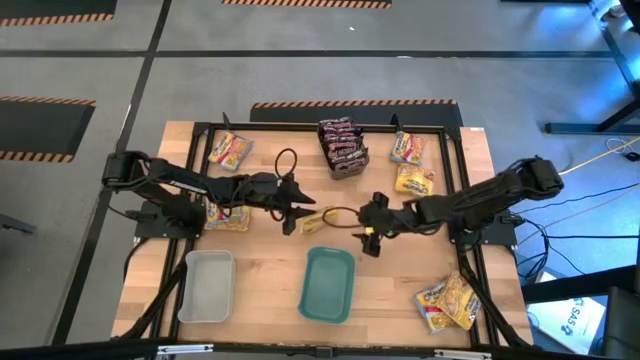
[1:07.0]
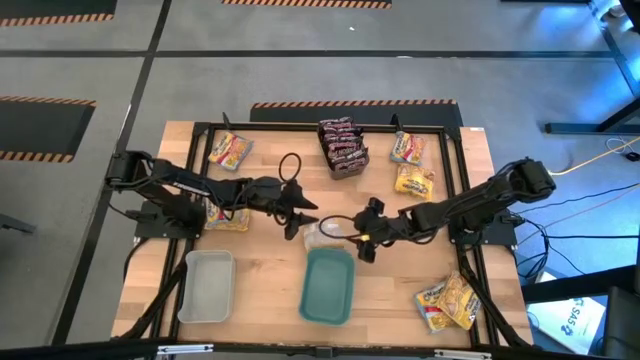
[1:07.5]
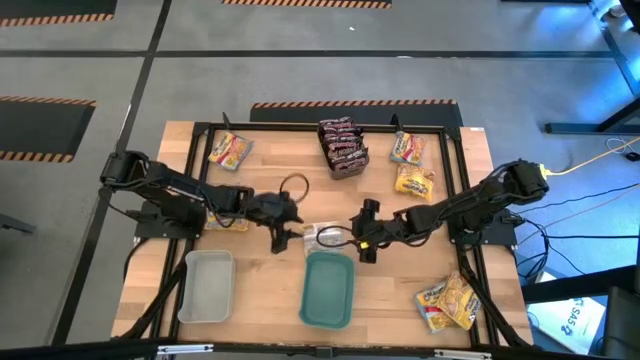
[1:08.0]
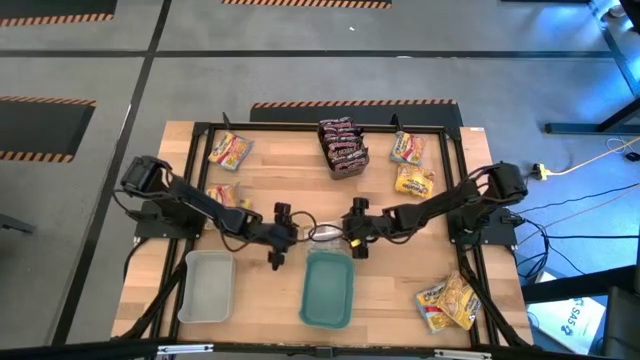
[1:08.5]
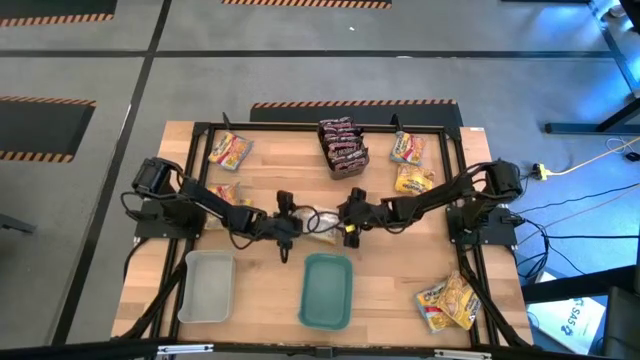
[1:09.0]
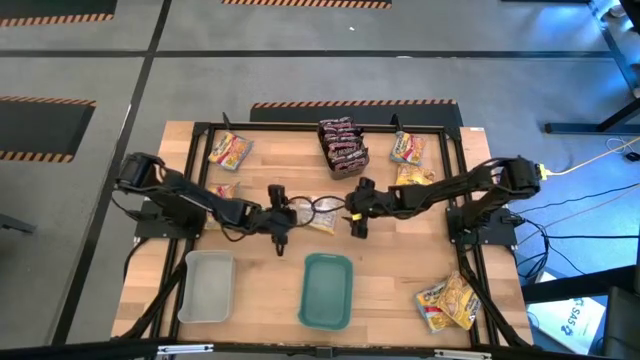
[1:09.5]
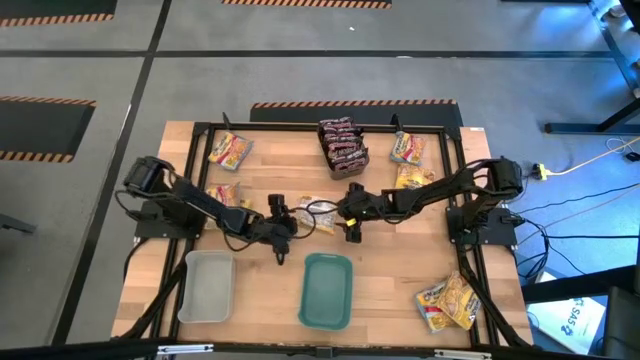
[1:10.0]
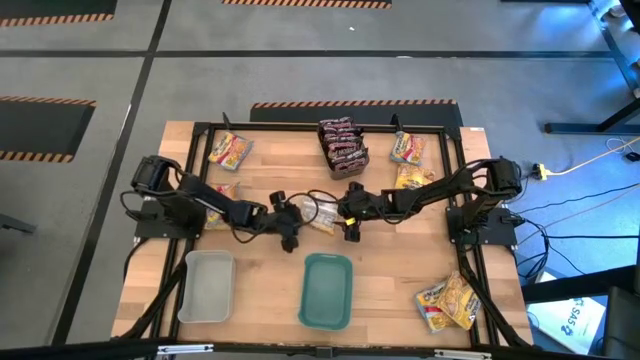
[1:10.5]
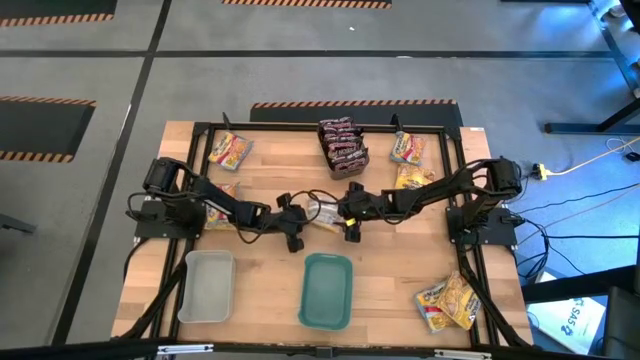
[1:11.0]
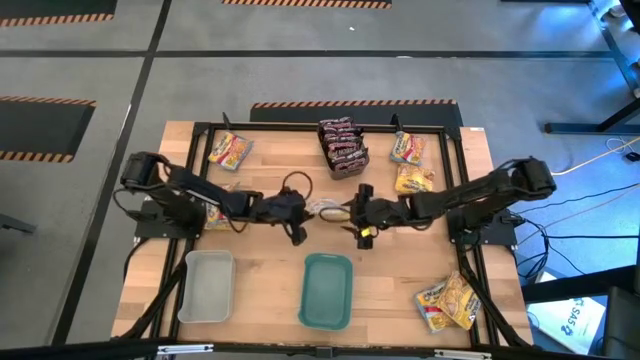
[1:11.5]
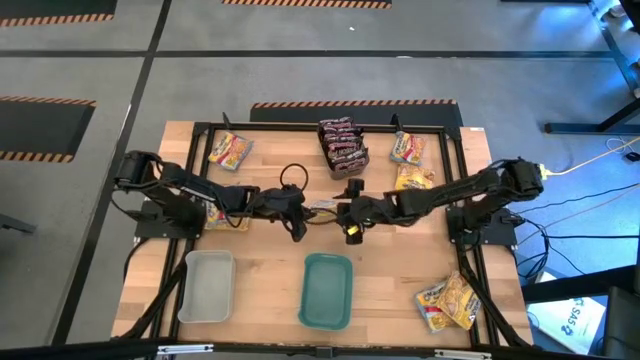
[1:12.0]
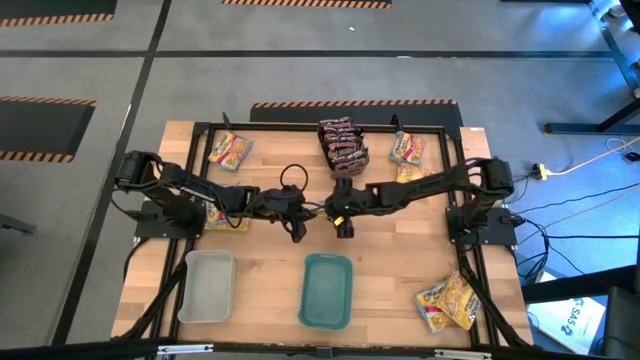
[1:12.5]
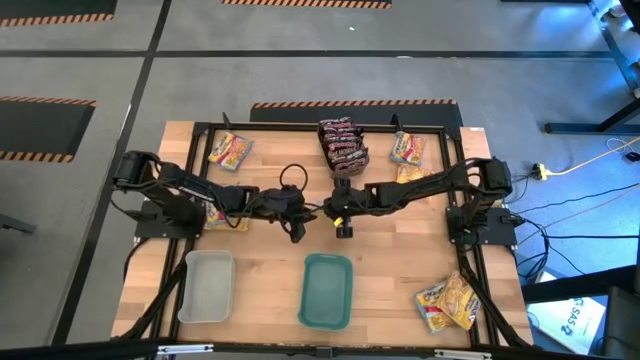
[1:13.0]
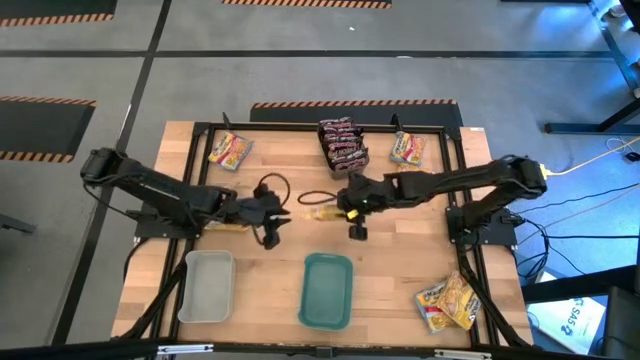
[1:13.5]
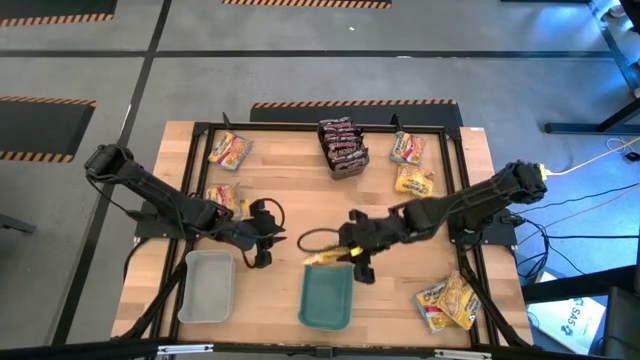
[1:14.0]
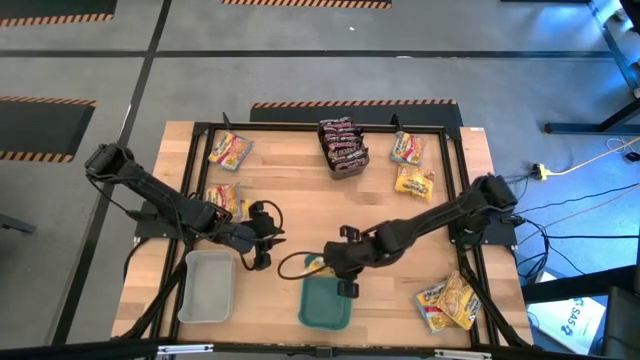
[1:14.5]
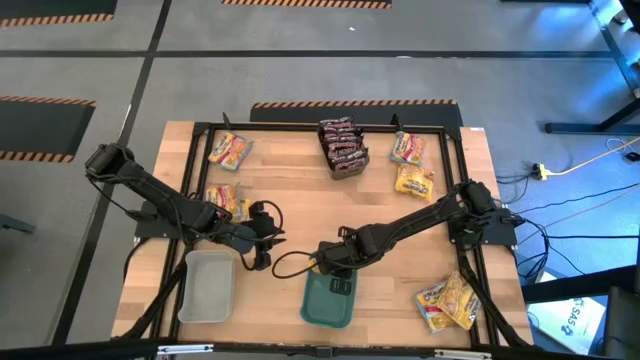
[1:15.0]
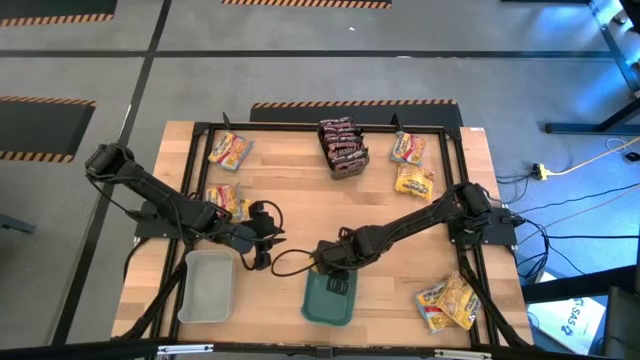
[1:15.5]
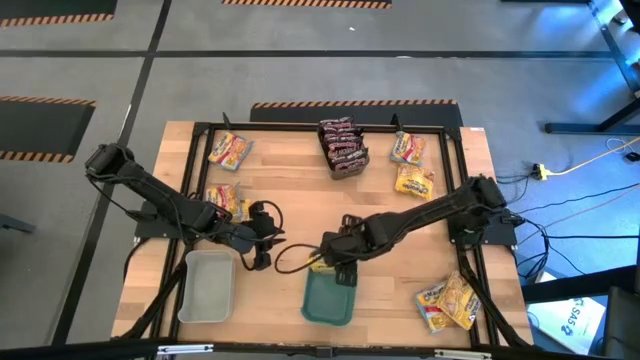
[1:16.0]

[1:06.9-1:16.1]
Task: Sort Maruchan noodles
Put the yellow noodle pack into the green bin

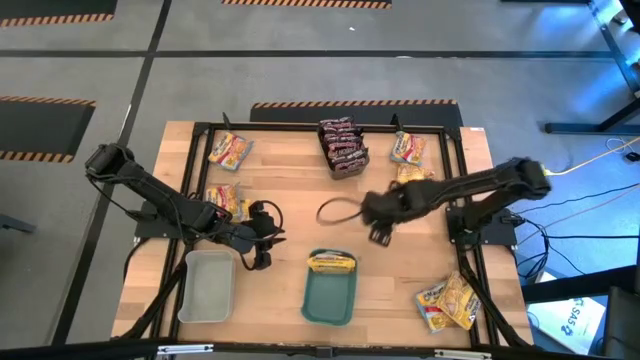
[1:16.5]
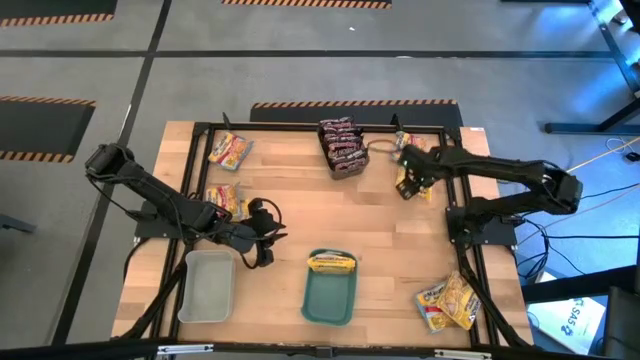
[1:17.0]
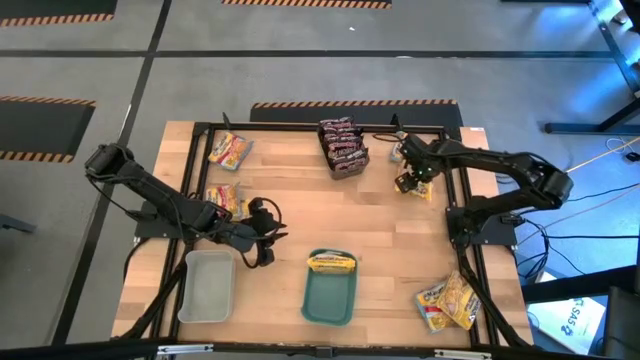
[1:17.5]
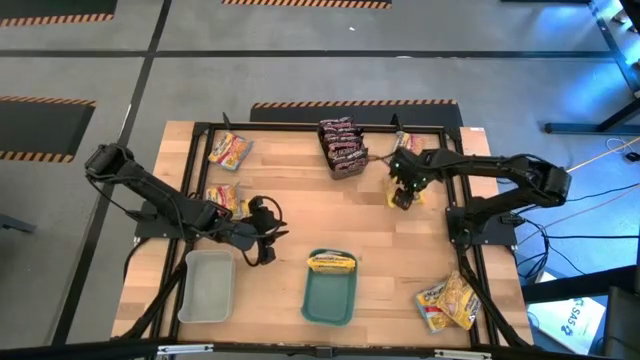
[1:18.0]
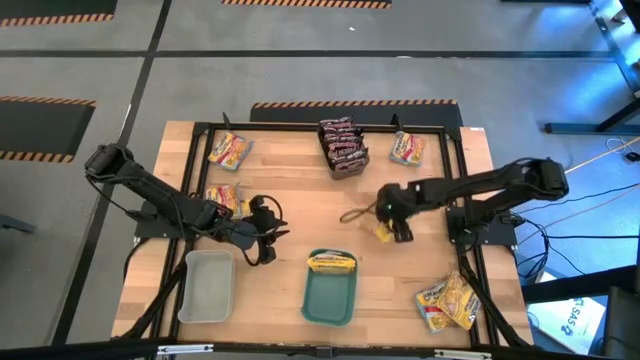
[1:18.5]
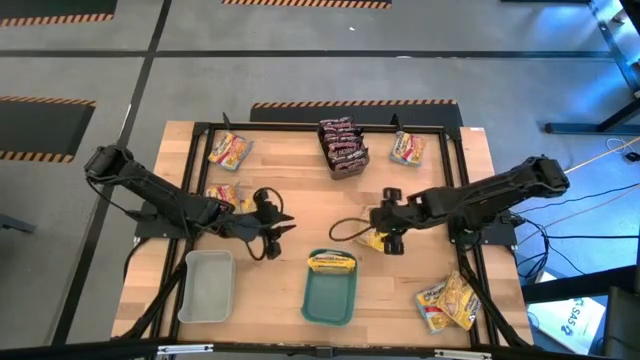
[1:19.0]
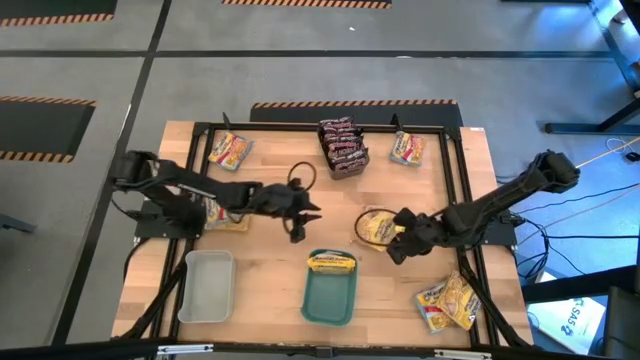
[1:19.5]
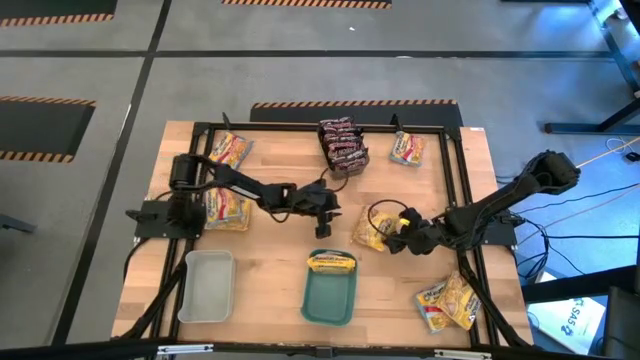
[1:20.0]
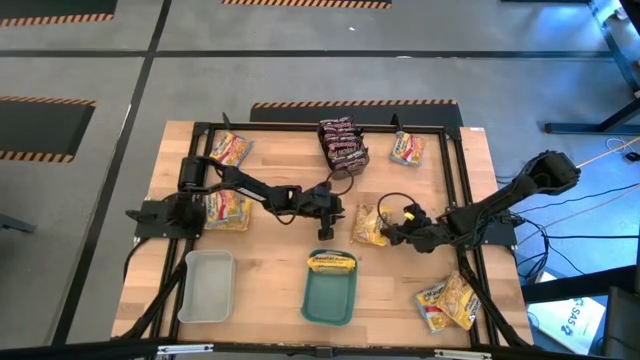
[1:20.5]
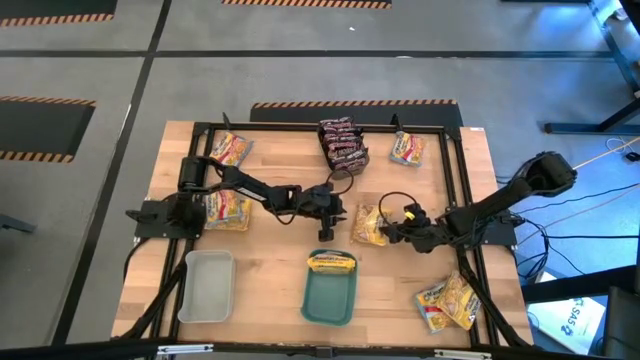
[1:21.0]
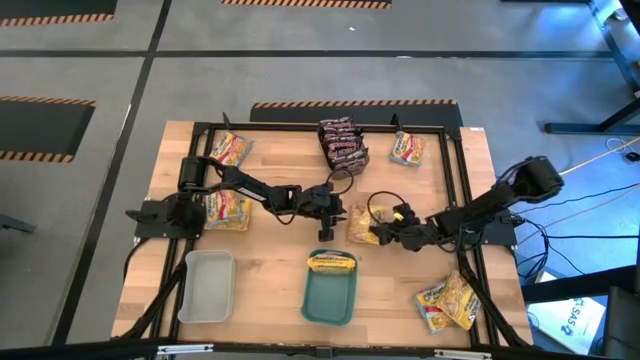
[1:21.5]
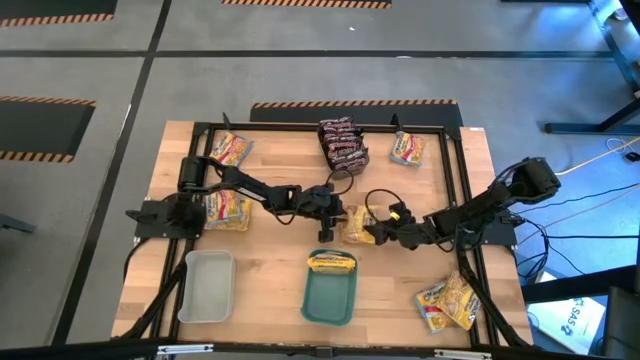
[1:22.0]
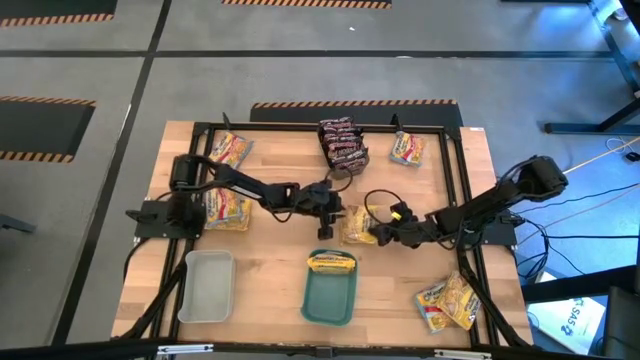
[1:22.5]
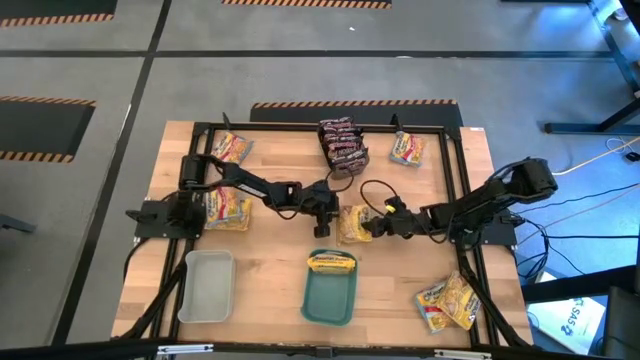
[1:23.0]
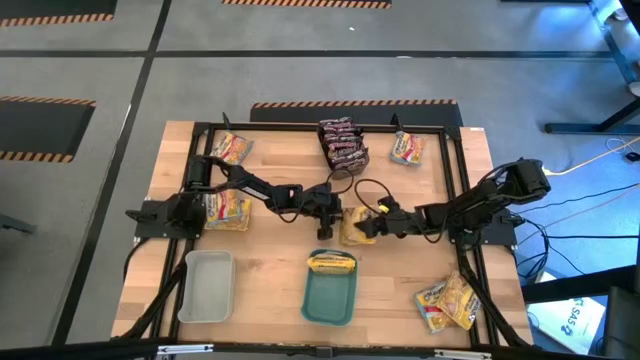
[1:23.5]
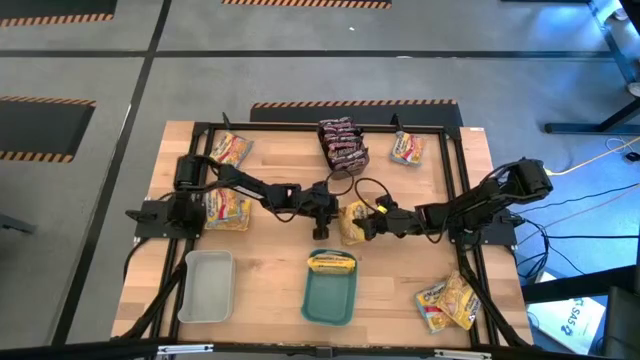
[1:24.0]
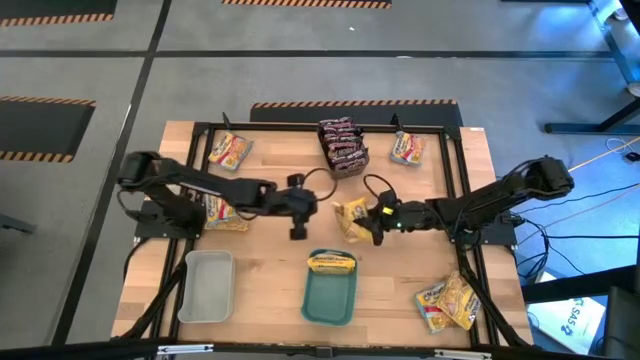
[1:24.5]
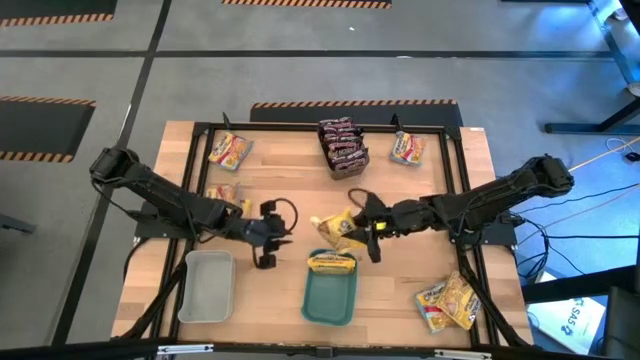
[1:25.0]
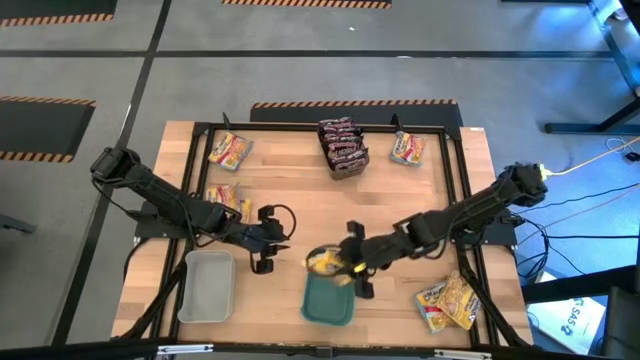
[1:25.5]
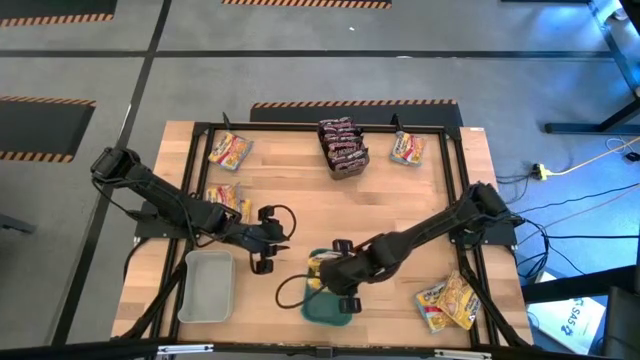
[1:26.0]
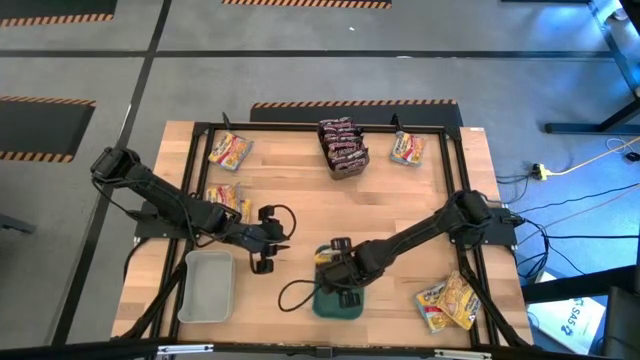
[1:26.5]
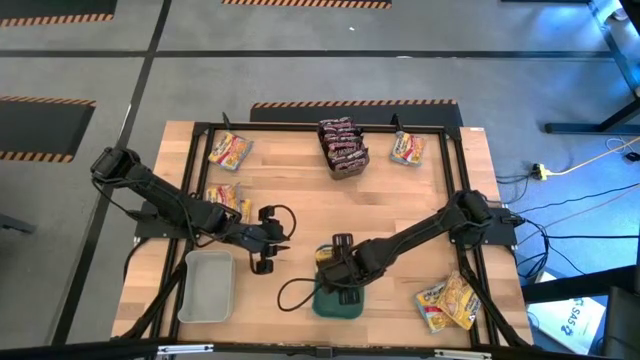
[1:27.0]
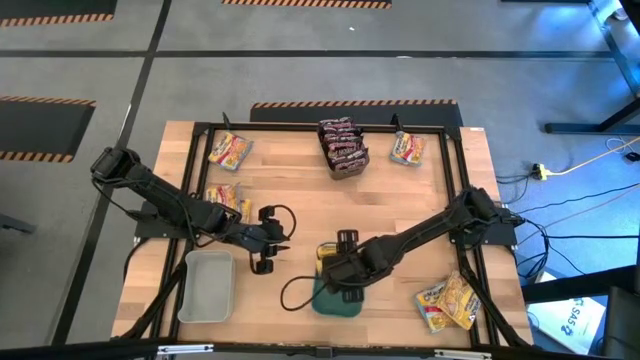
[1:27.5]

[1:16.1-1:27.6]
Put the yellow noodle pack into the green bin
